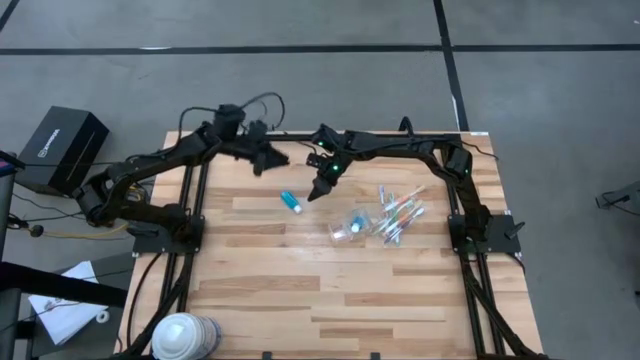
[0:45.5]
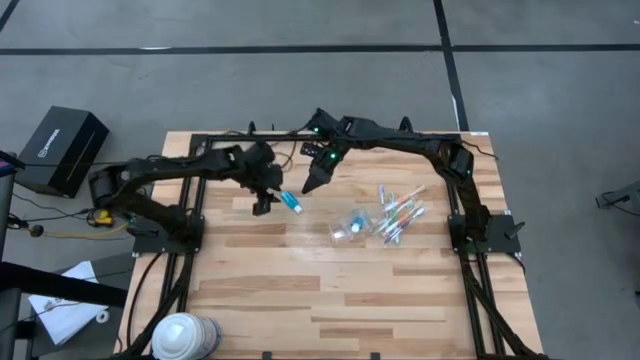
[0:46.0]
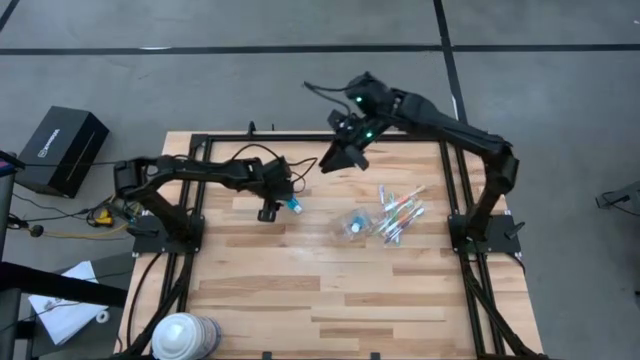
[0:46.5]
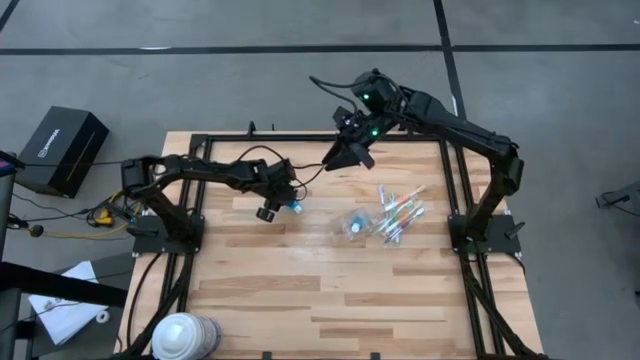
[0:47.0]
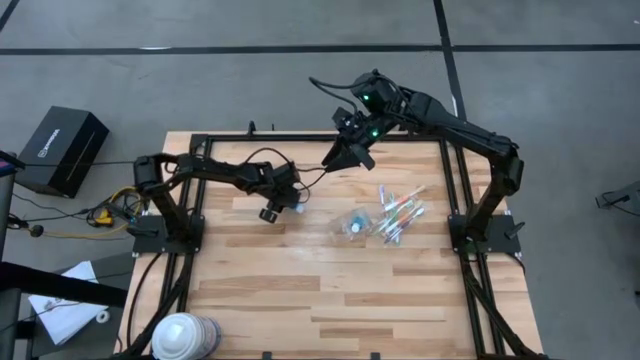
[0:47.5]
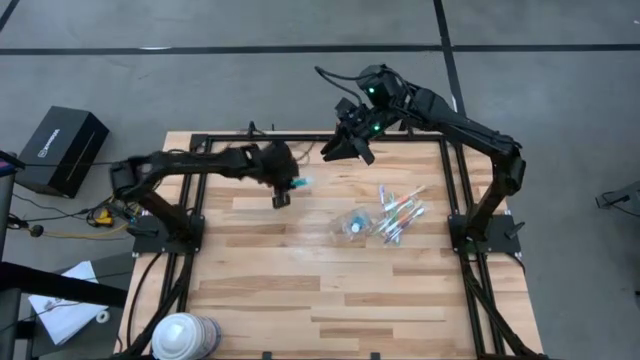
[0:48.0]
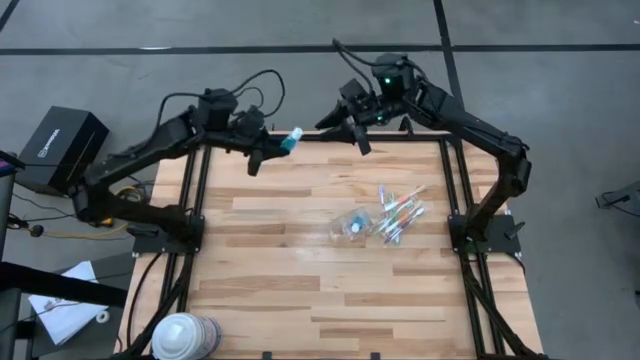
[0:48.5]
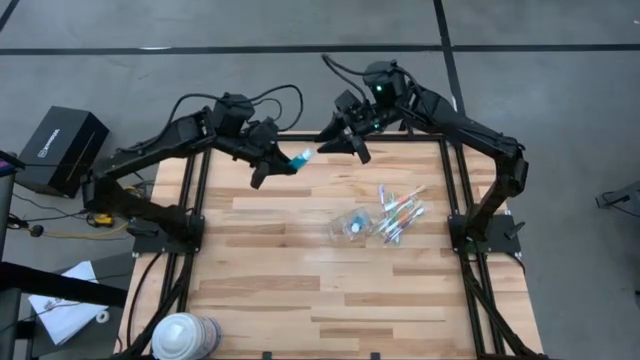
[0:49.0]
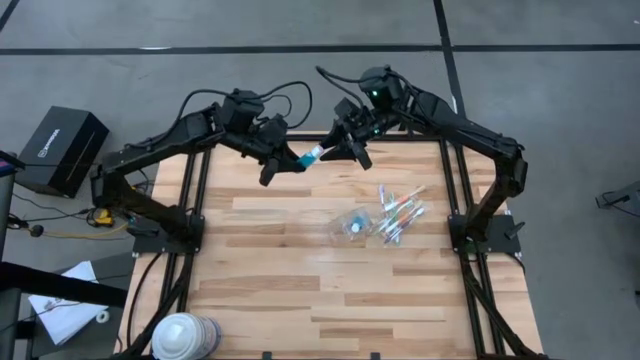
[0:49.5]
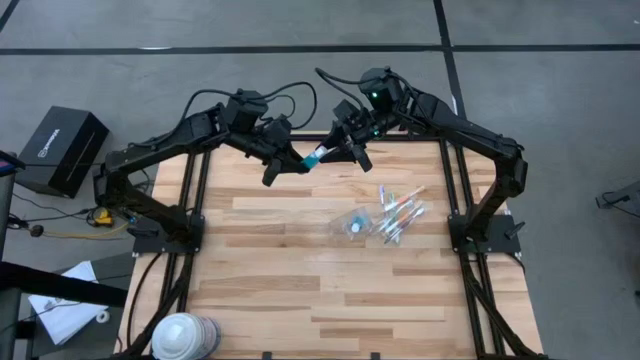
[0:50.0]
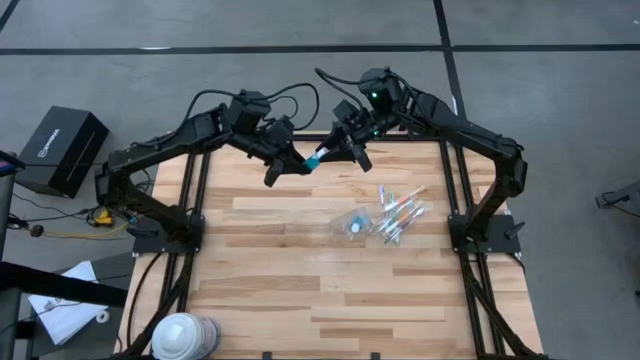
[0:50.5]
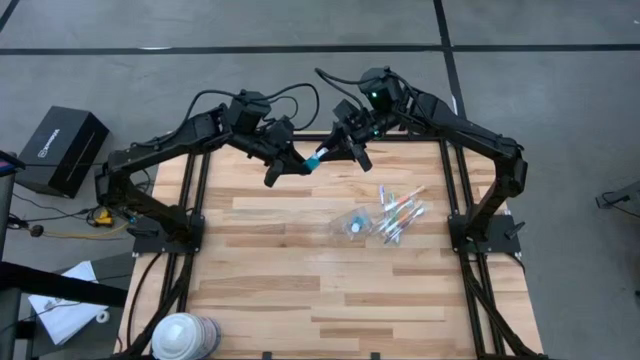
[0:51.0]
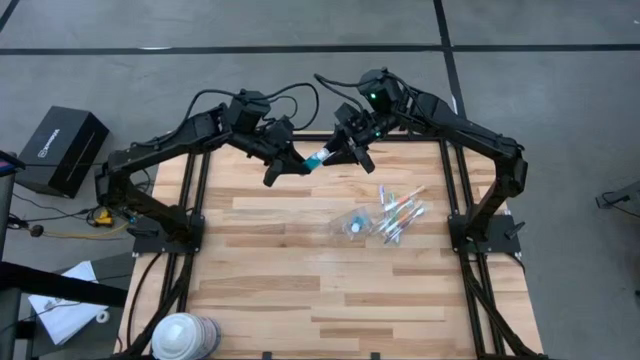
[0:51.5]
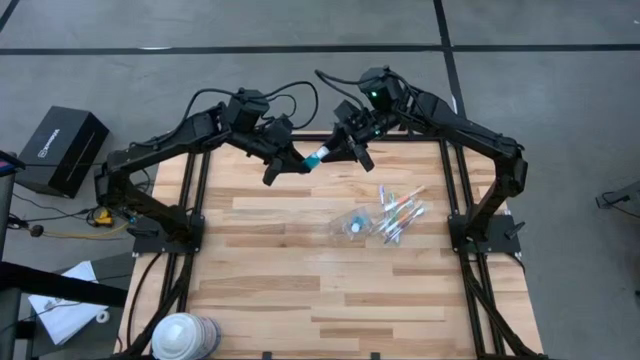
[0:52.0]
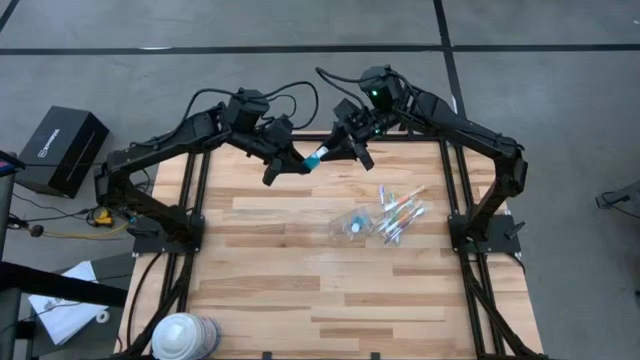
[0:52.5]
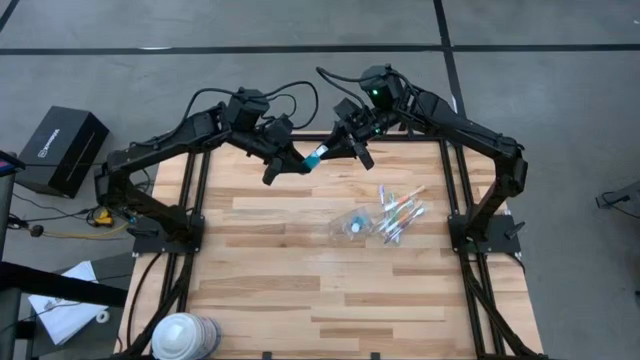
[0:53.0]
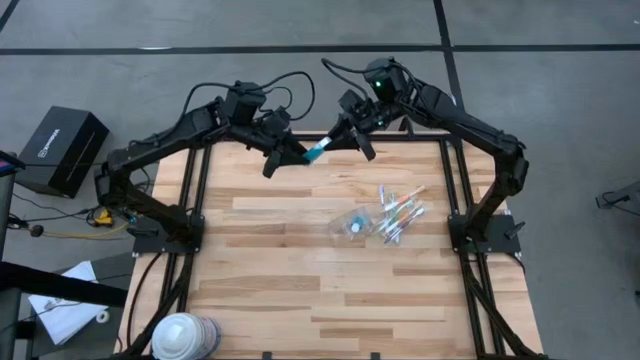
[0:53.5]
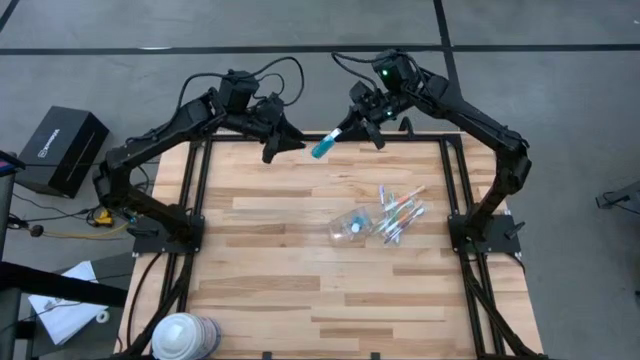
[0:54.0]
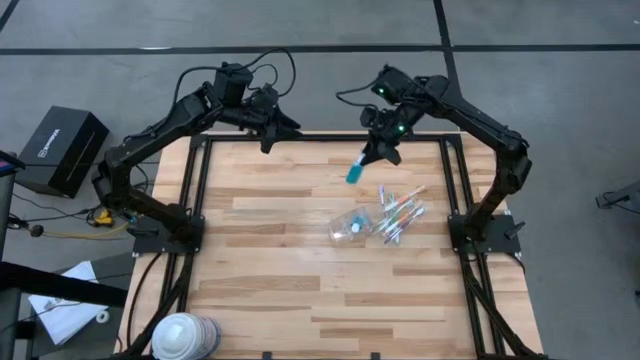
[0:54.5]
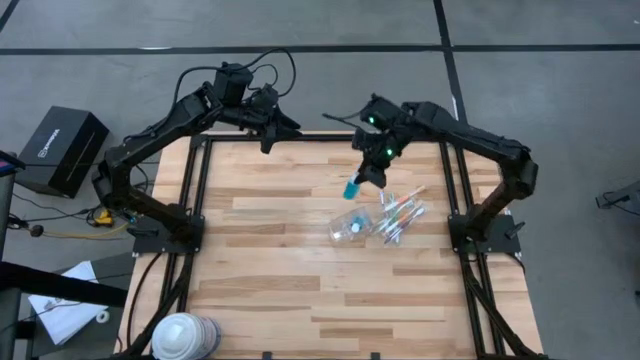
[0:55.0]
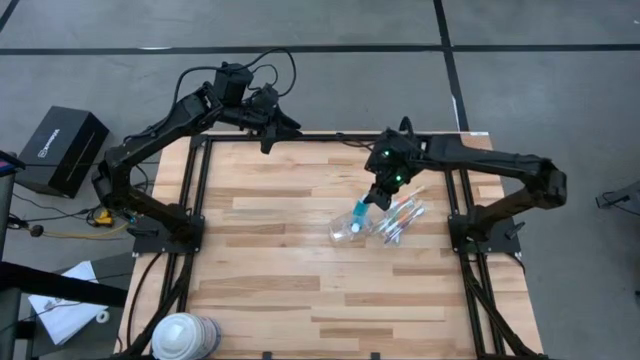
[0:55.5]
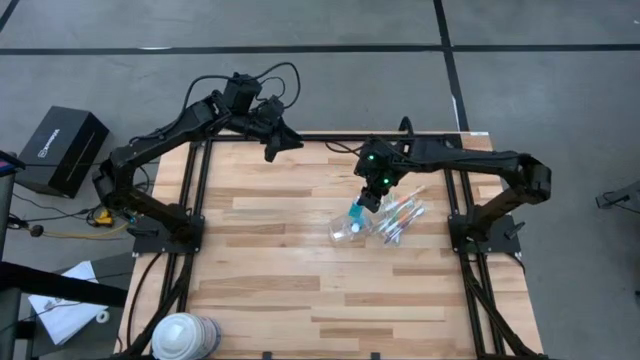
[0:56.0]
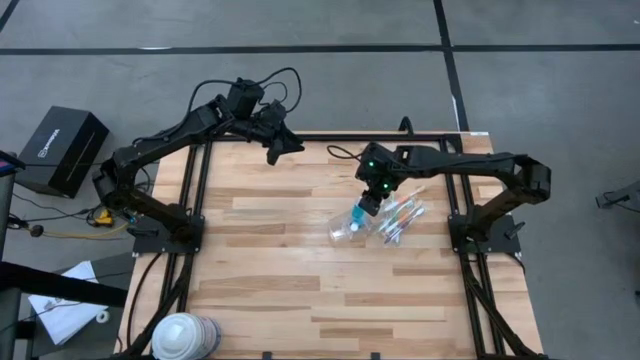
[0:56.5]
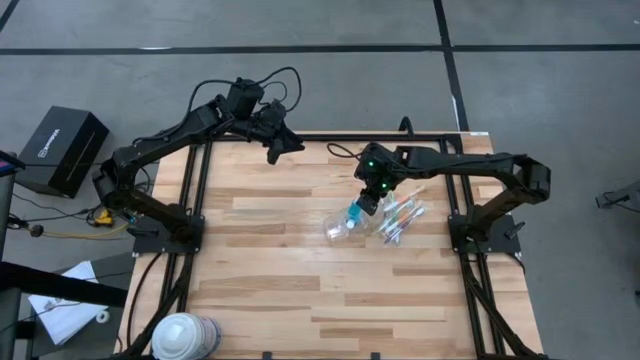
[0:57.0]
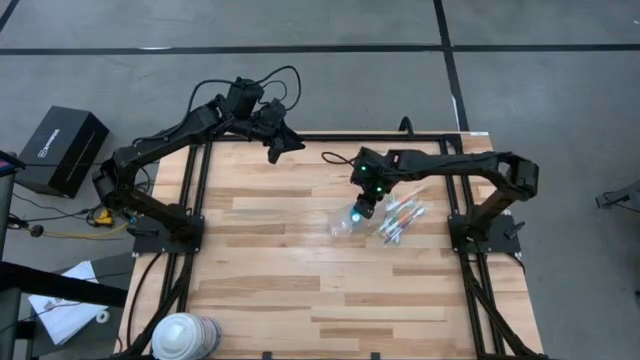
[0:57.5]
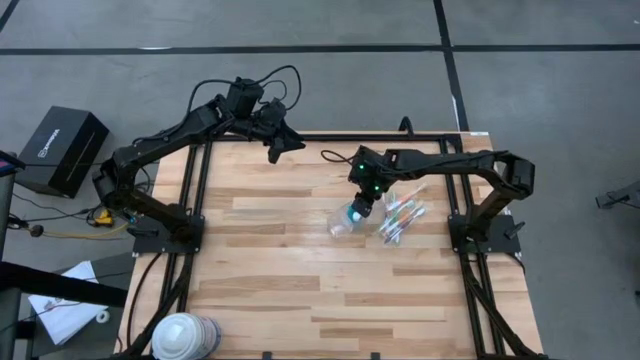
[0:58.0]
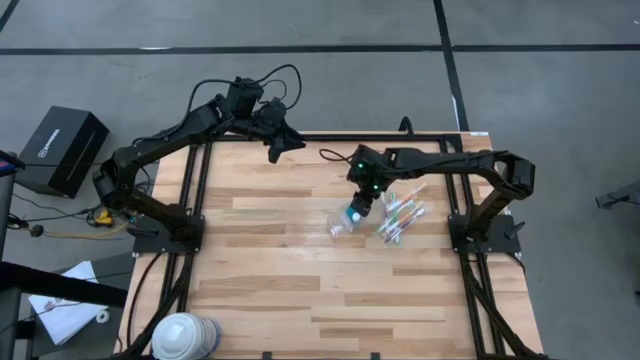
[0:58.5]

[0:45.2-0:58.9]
Task: Pick & Place toothbrushing station
Put the blue mouthwash into the transparent organizer

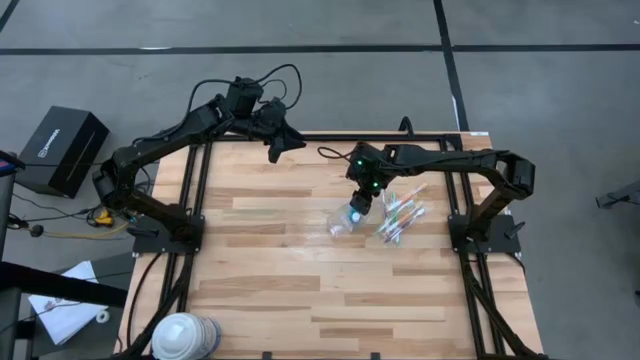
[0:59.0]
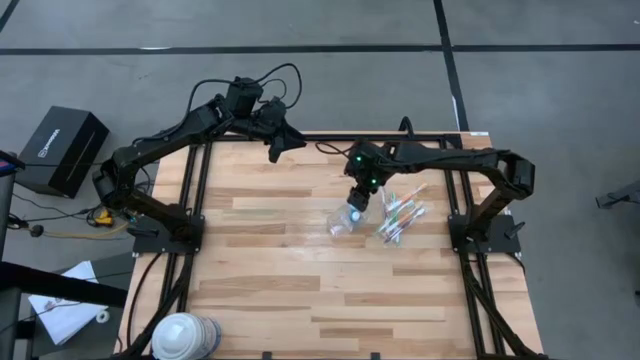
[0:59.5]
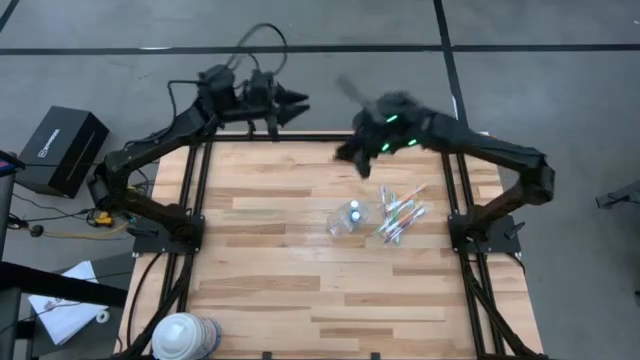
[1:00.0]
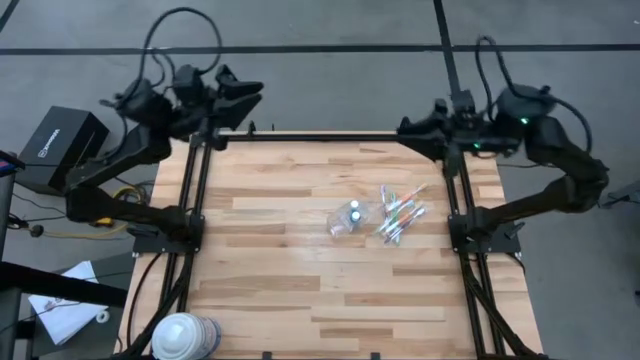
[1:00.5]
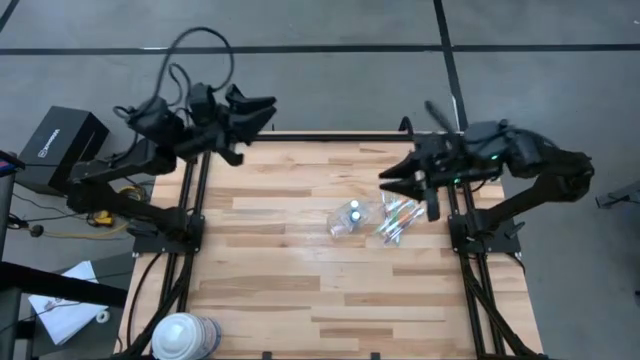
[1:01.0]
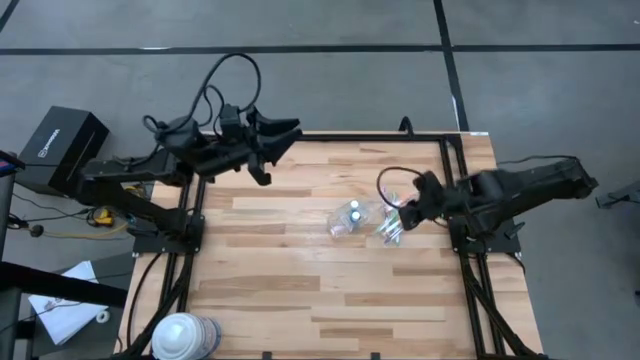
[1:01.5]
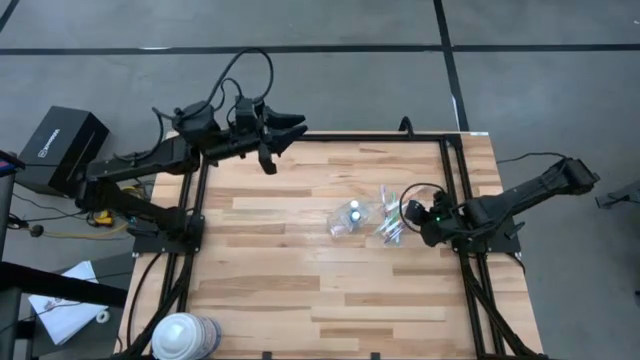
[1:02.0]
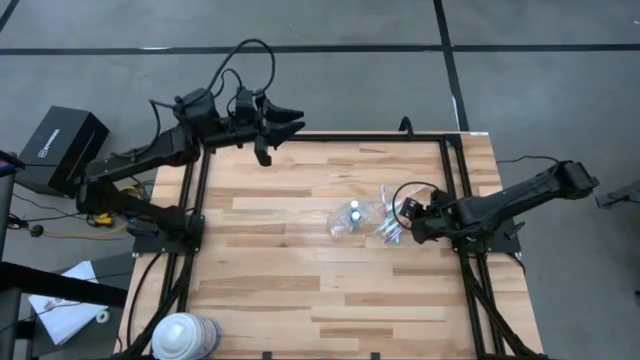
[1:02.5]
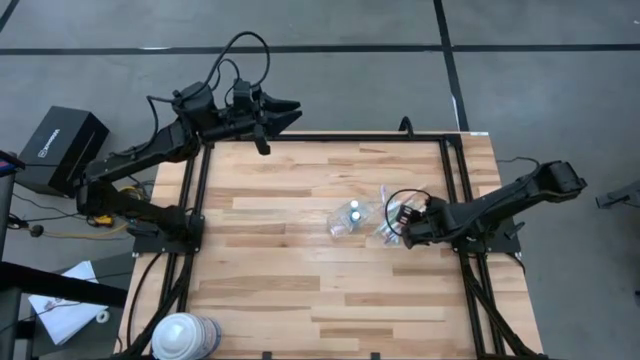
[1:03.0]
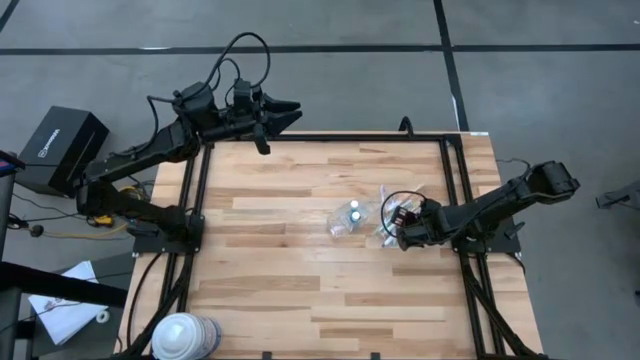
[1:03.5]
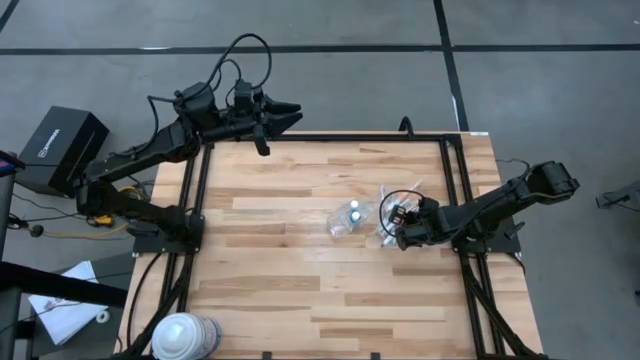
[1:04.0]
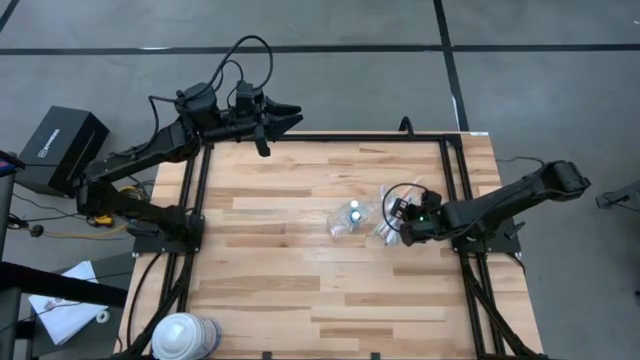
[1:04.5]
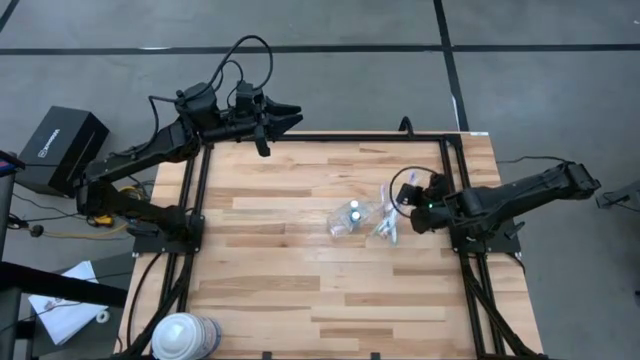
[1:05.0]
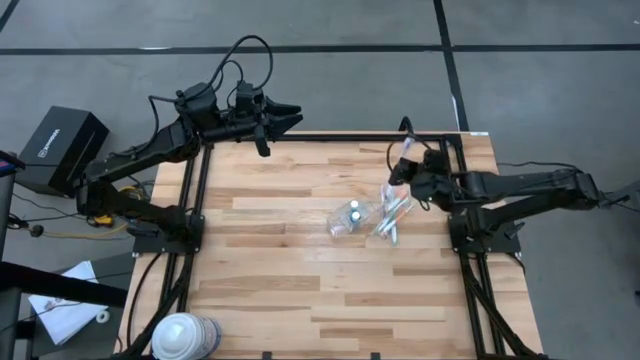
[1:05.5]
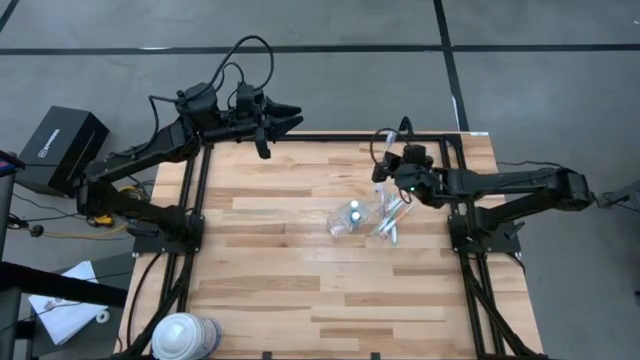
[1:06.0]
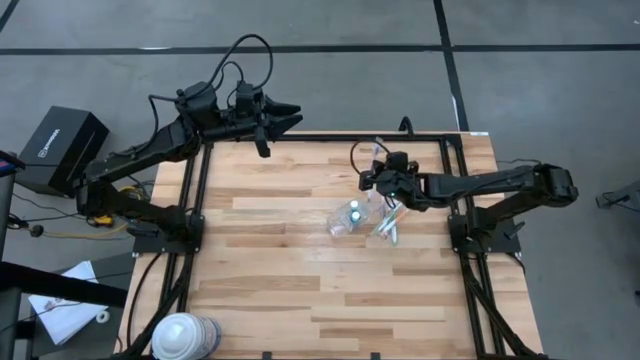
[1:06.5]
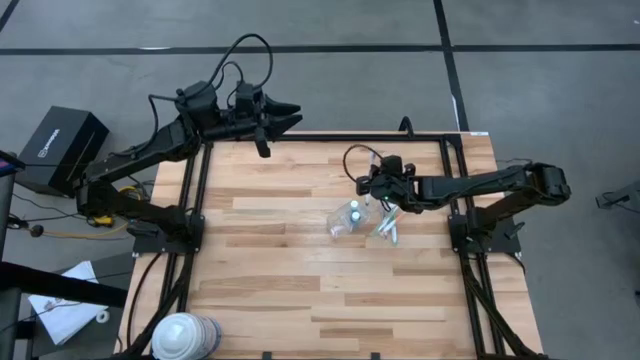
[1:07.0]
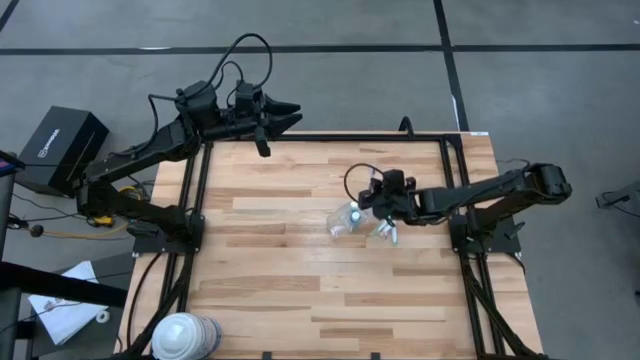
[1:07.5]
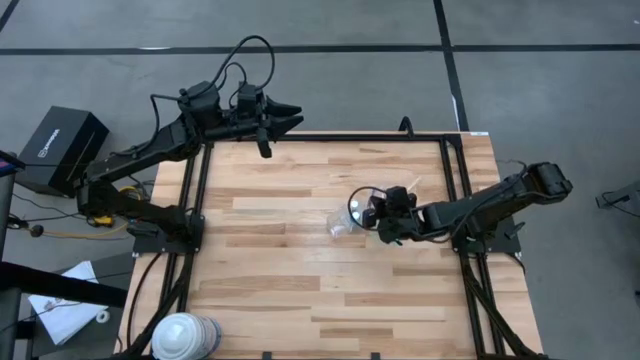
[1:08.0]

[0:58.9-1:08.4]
Put the purple toothbrush into the transparent organizer
